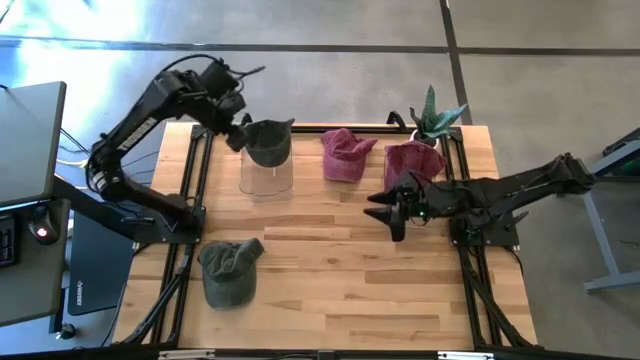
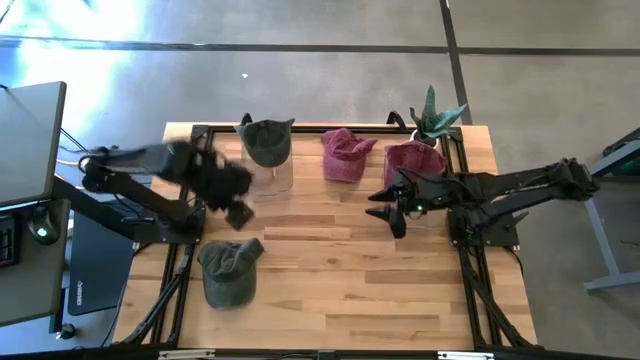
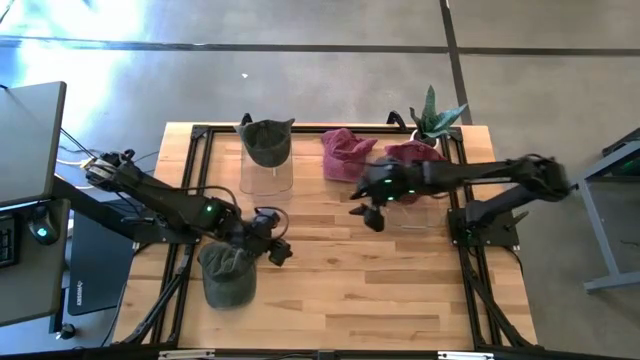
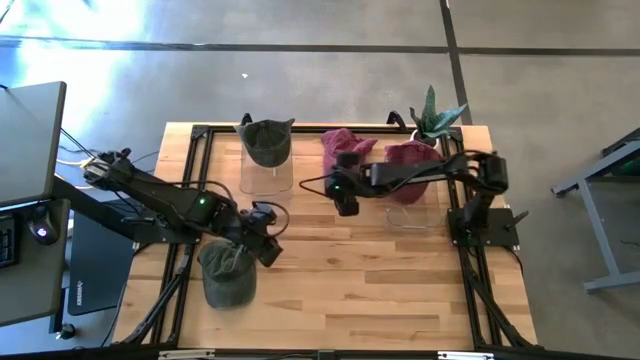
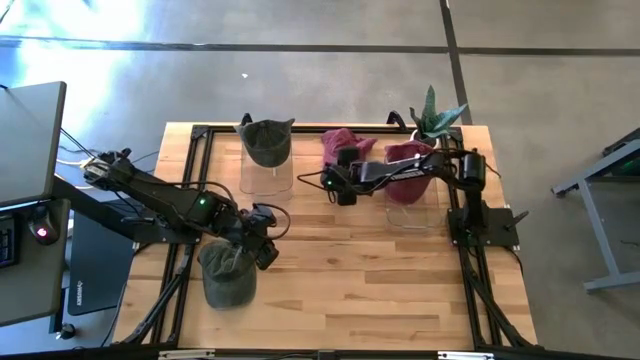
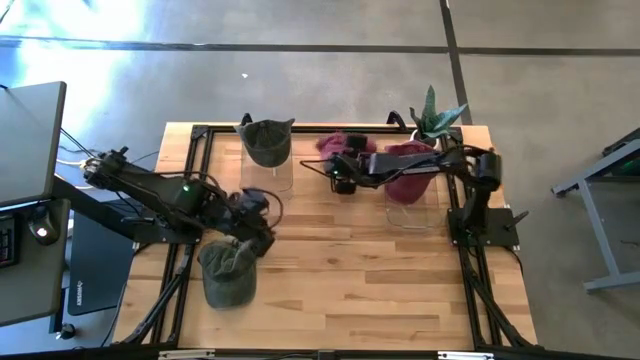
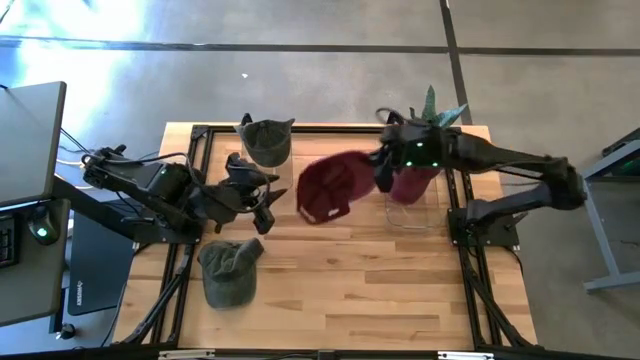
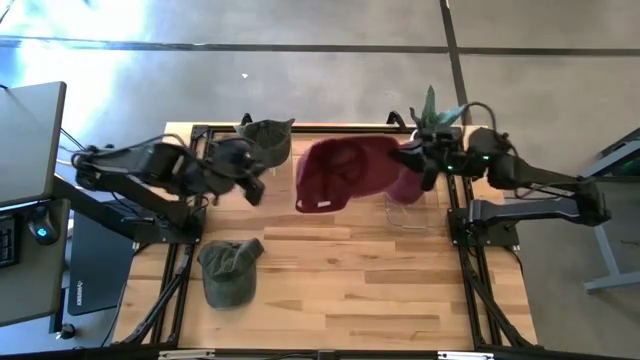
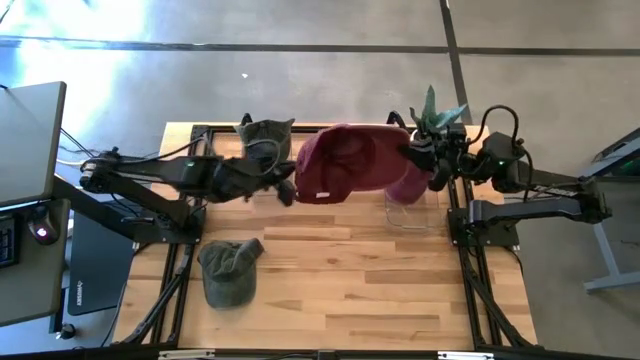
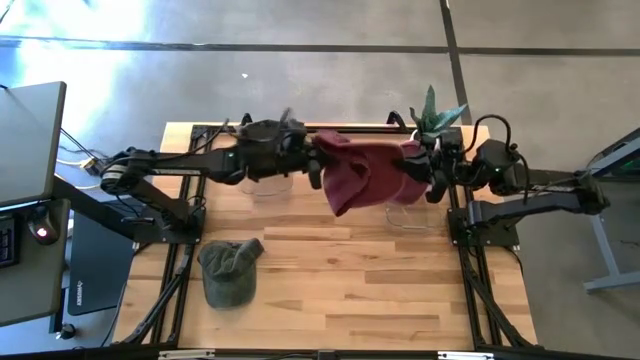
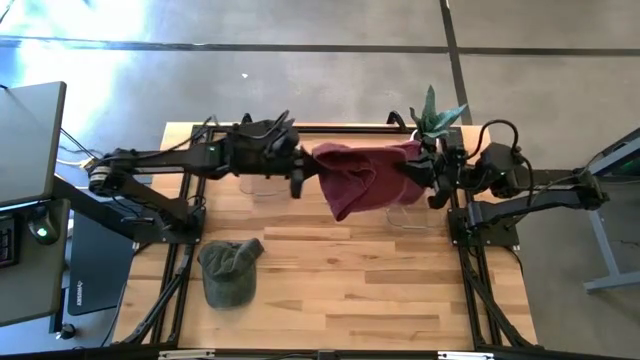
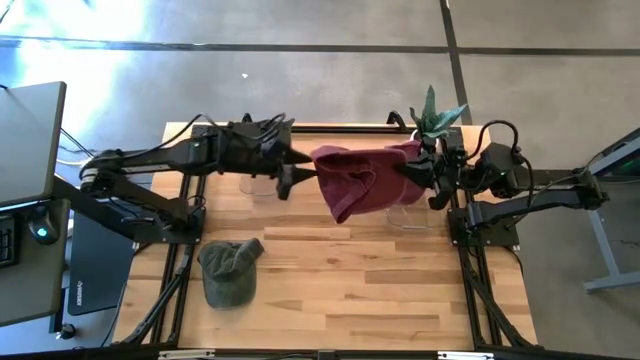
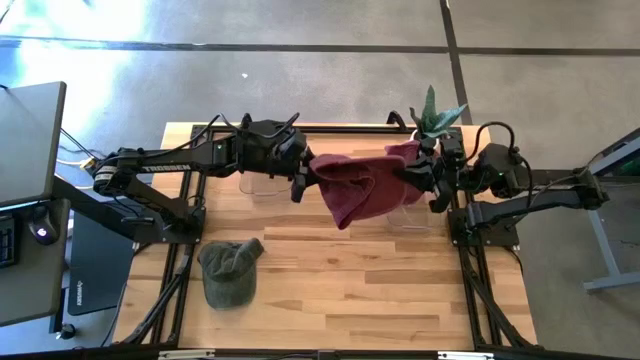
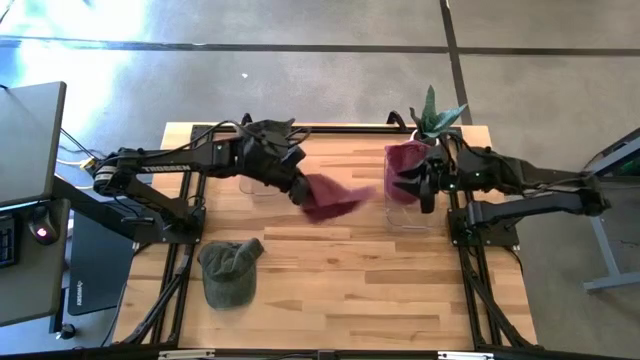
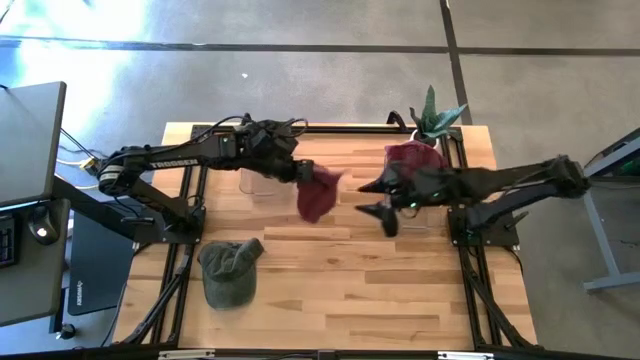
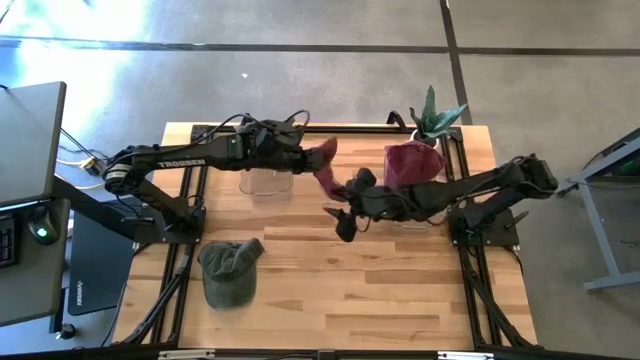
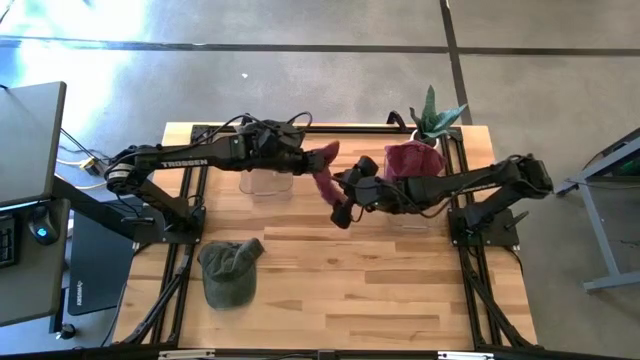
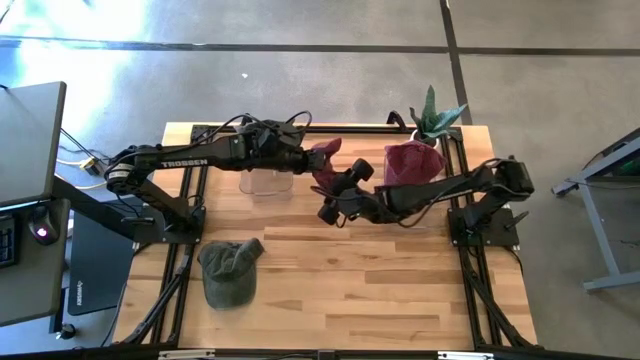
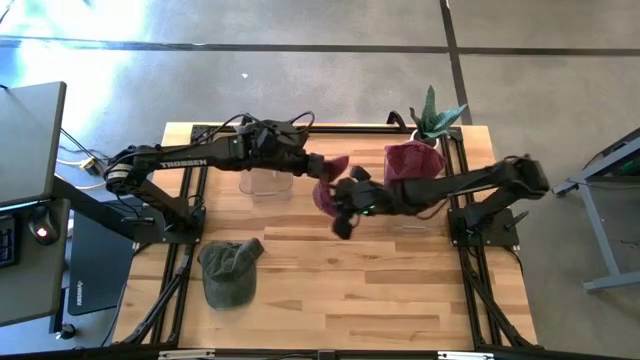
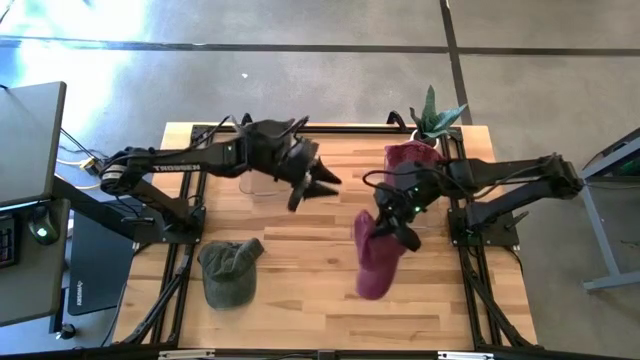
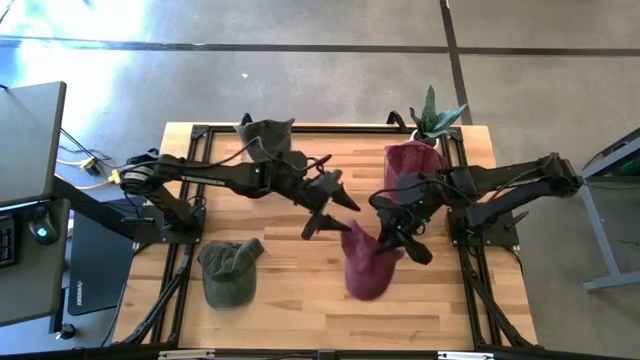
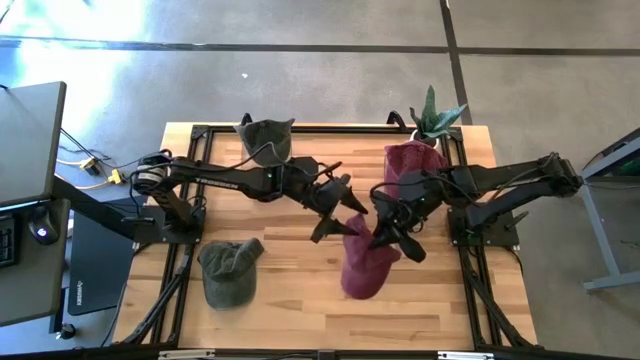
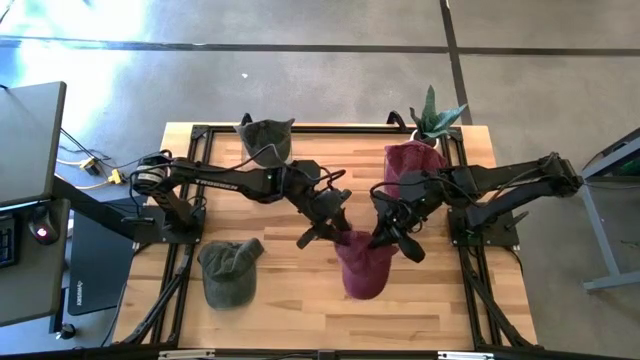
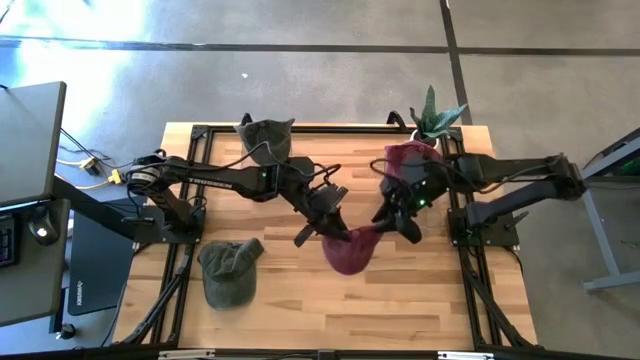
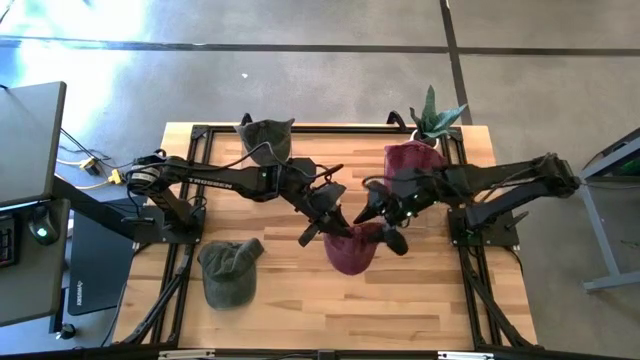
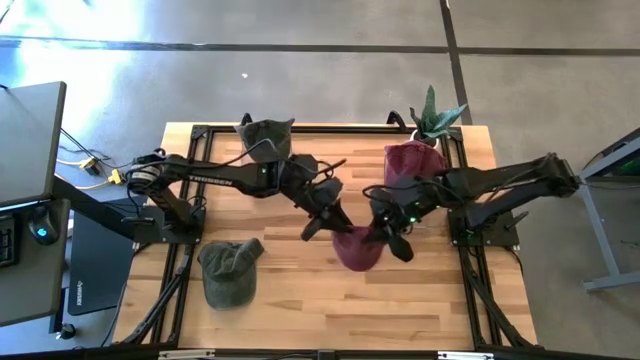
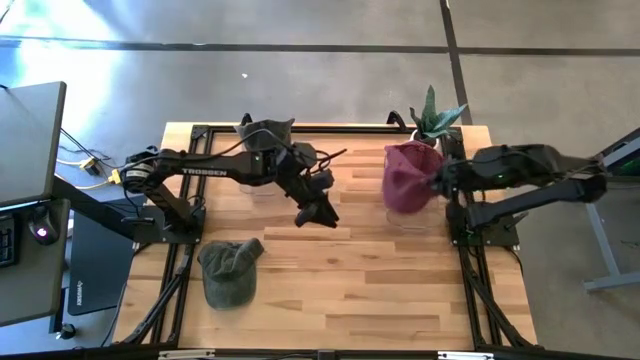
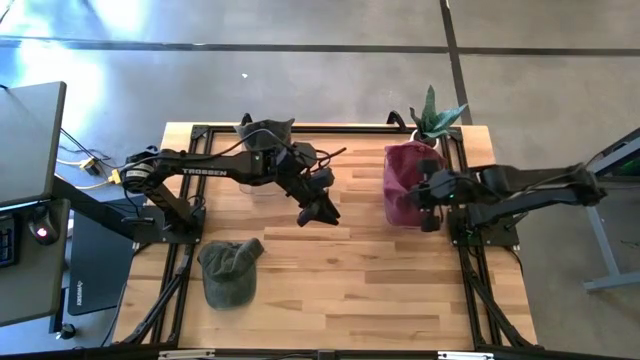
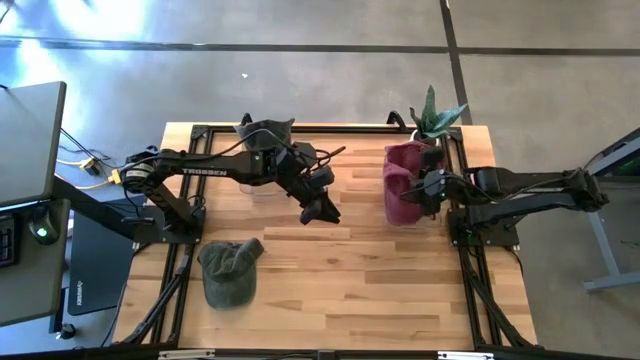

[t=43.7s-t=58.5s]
Task: Pick & Place hat
Put the red cap into the right transparent bin

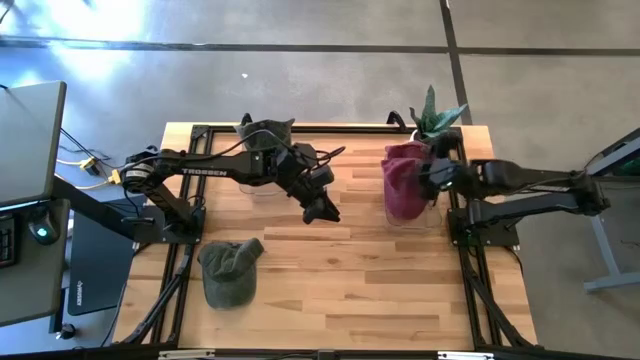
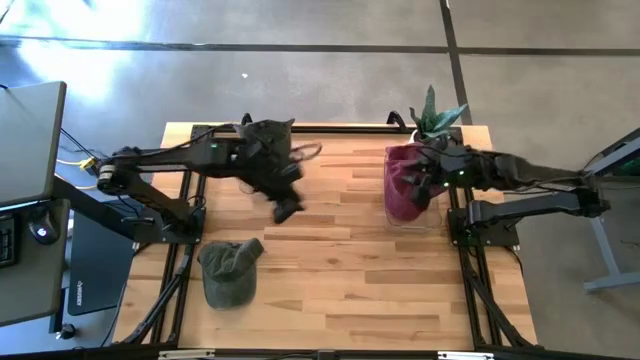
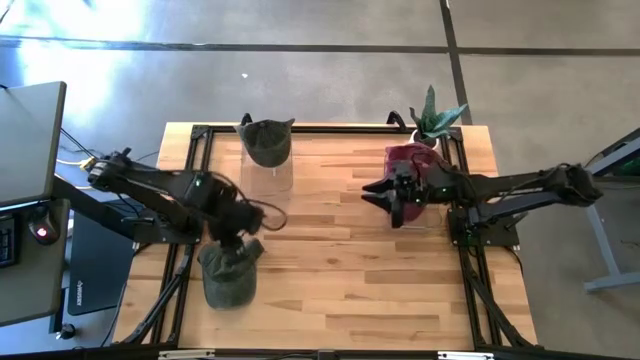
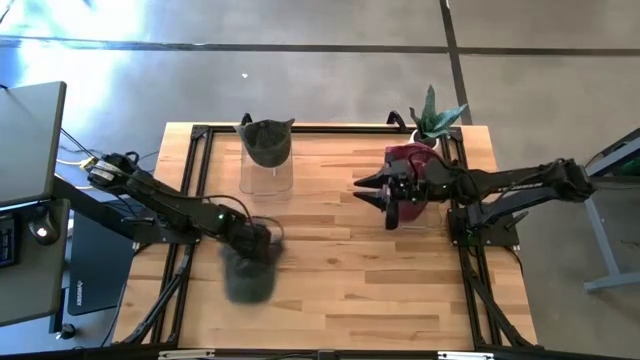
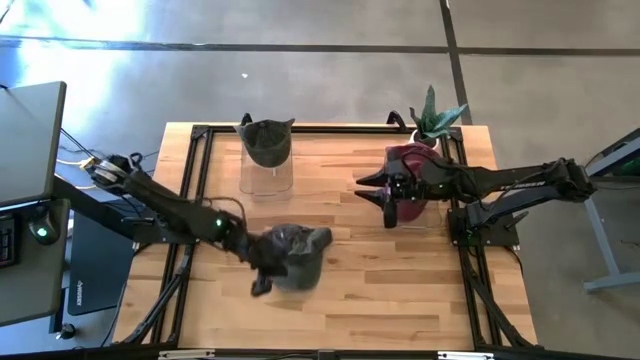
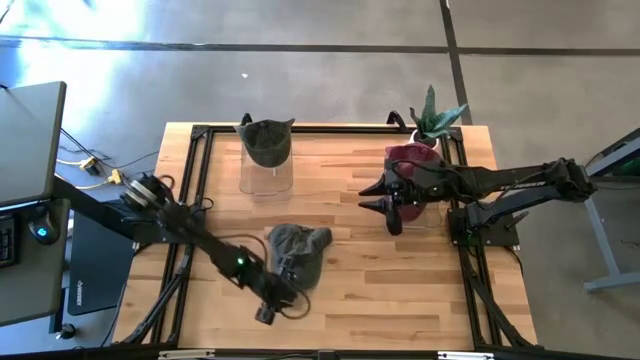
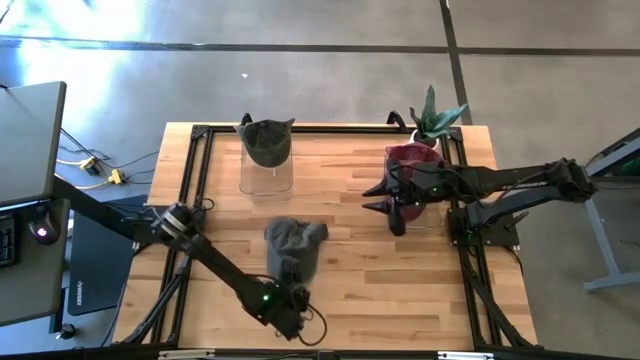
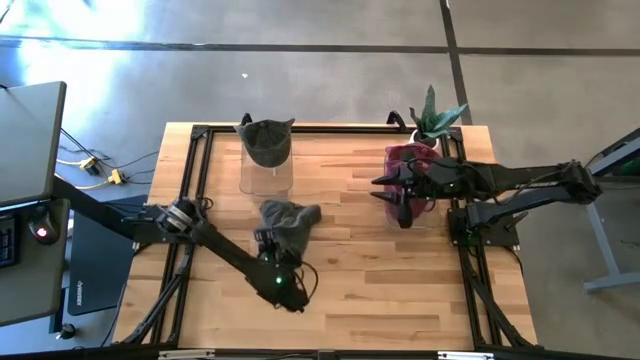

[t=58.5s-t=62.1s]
Put the green cap into the left transparent bin
